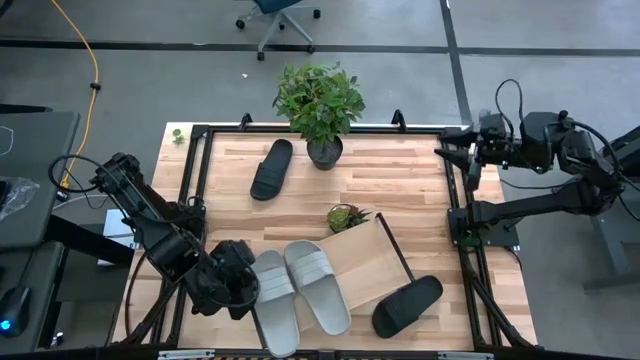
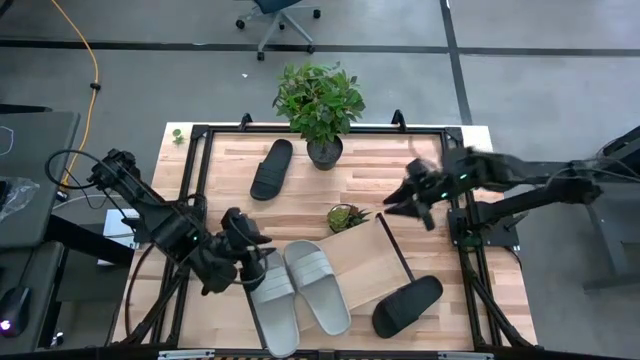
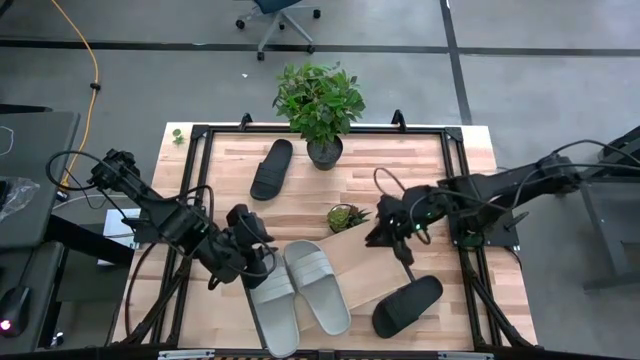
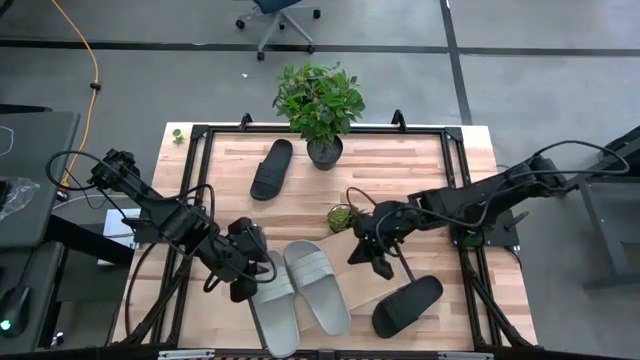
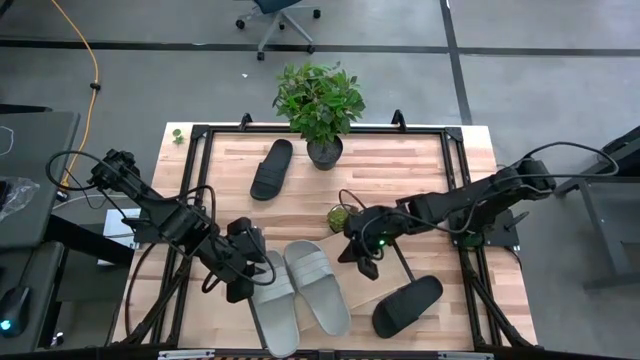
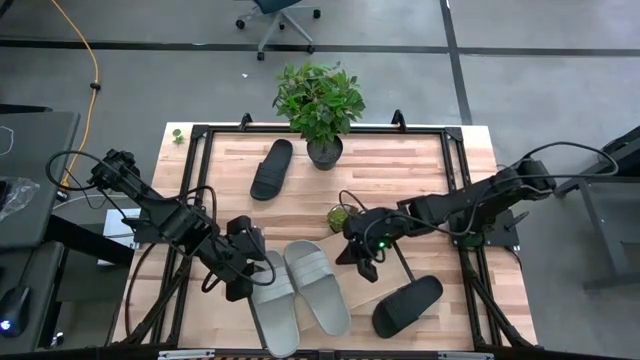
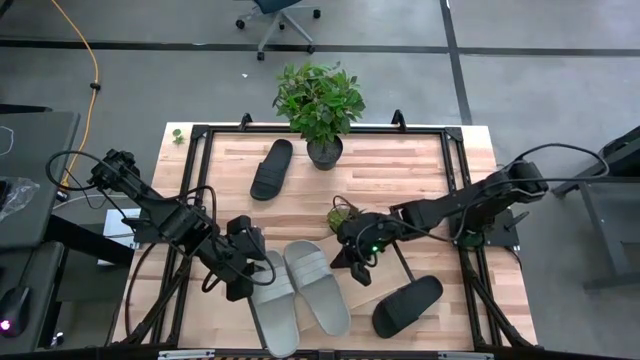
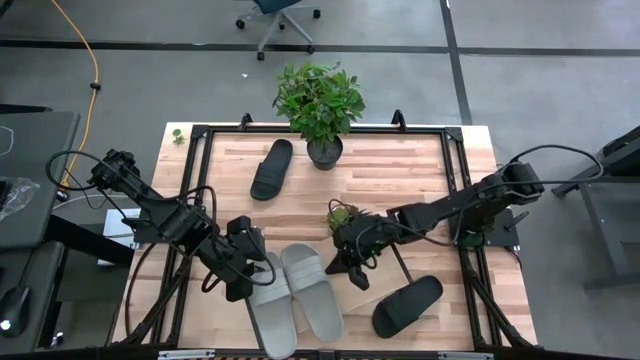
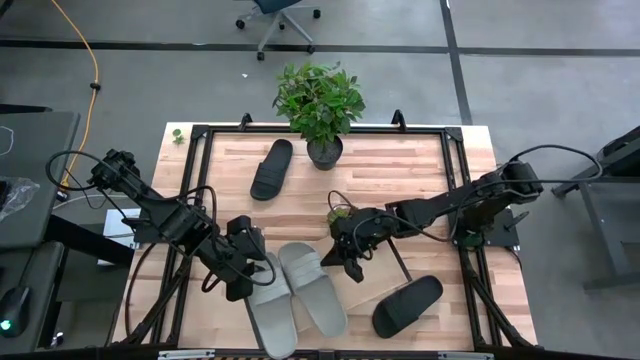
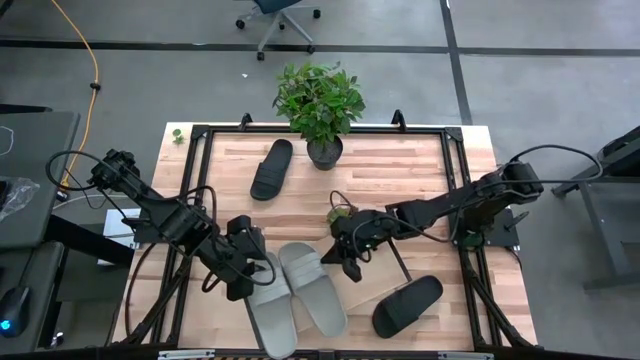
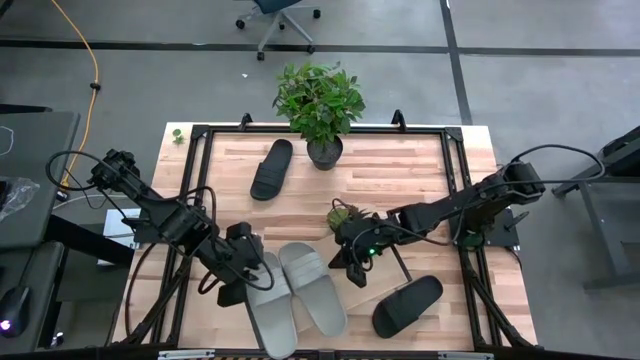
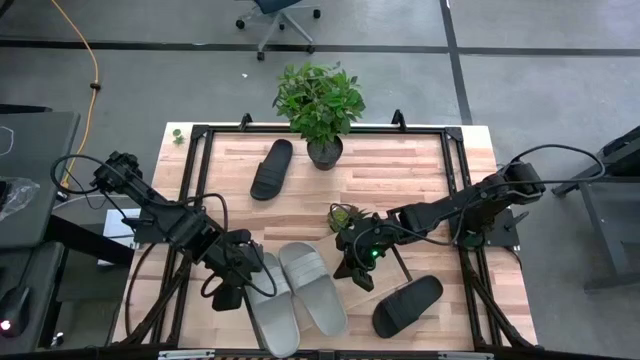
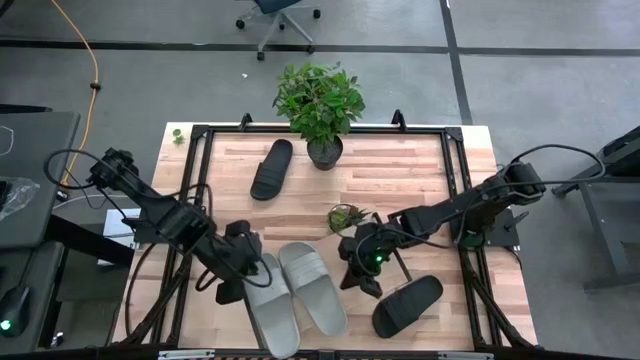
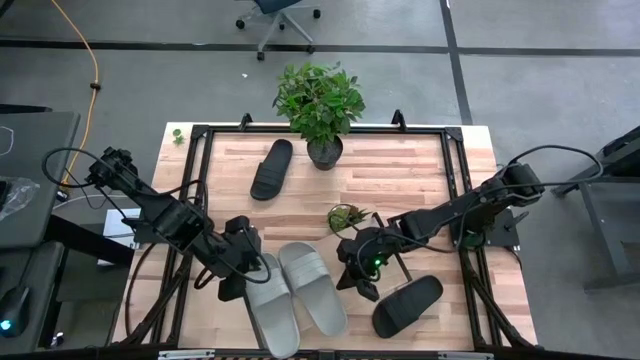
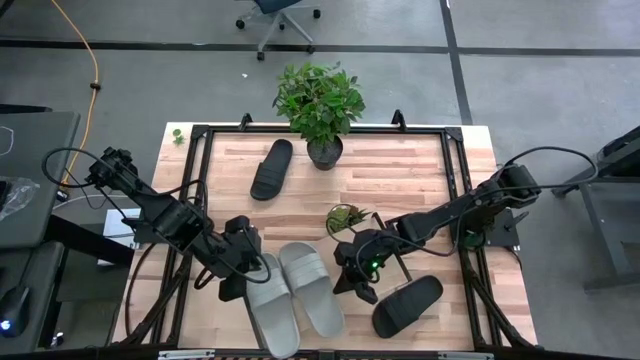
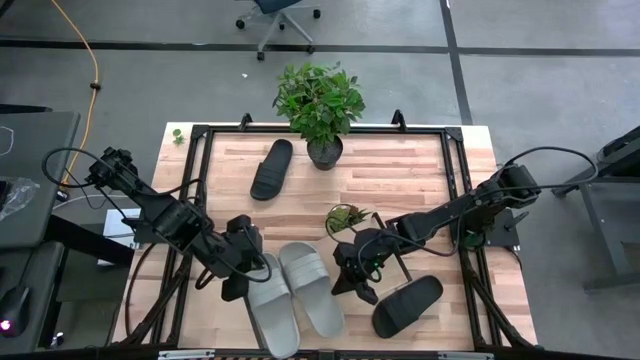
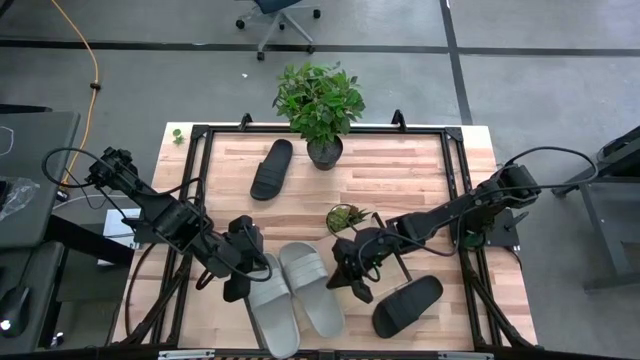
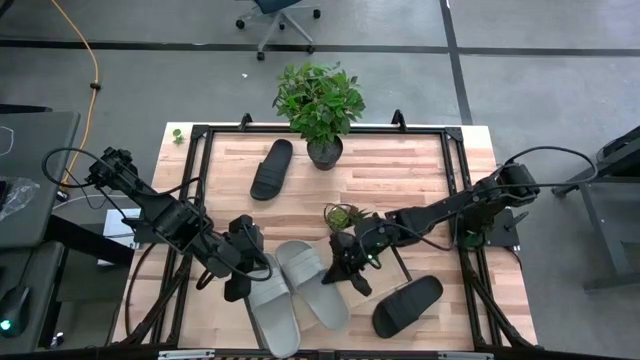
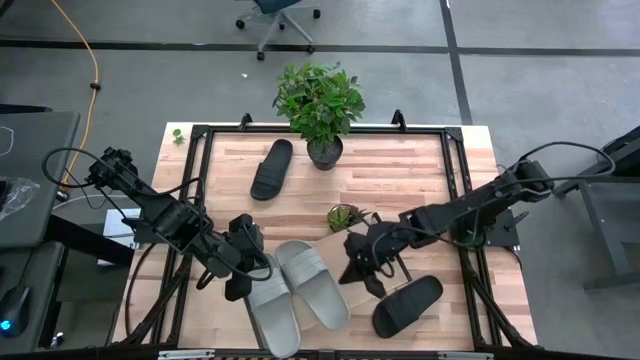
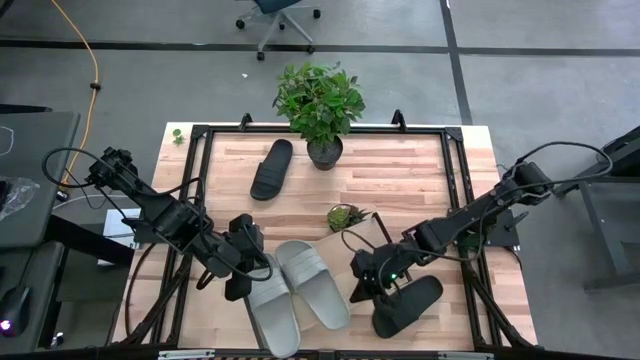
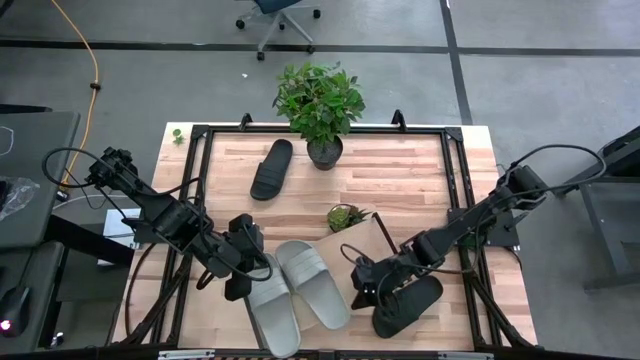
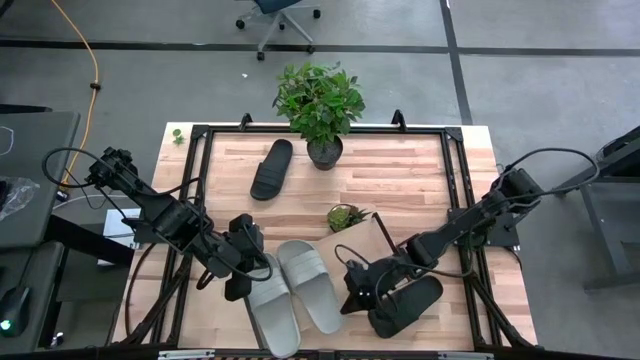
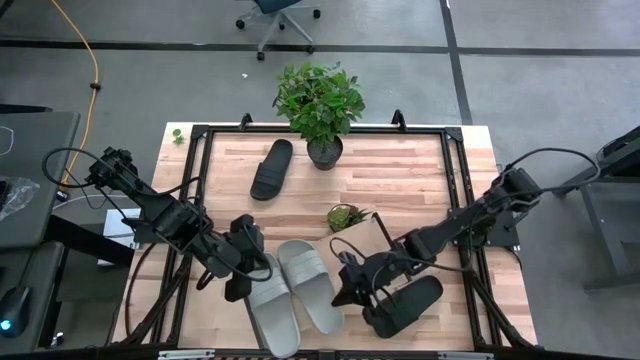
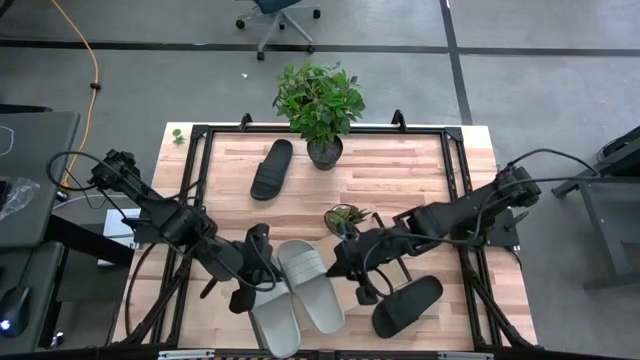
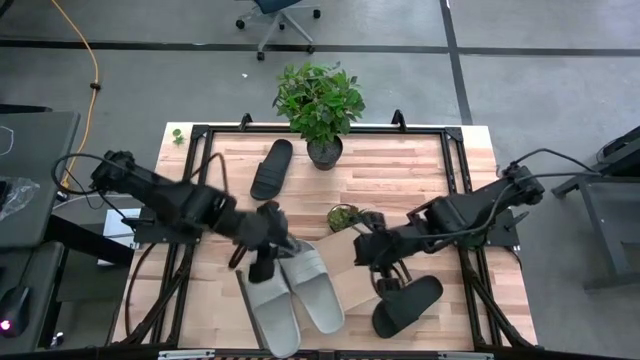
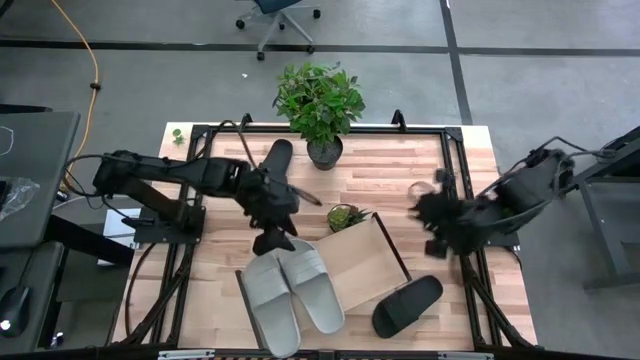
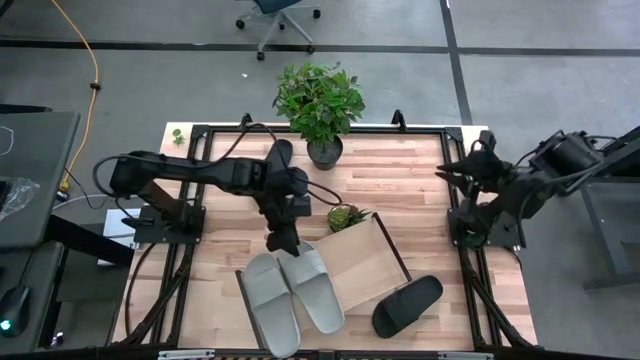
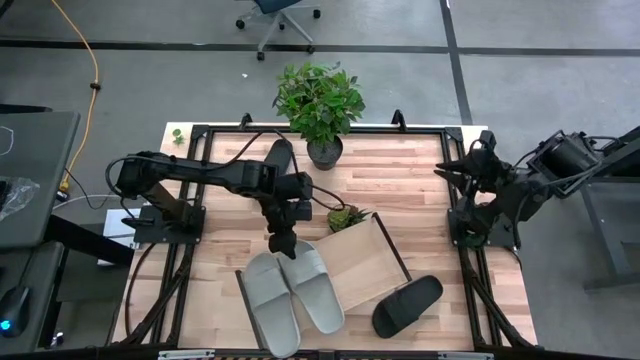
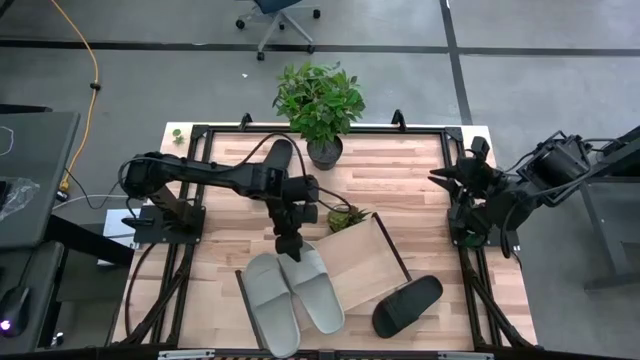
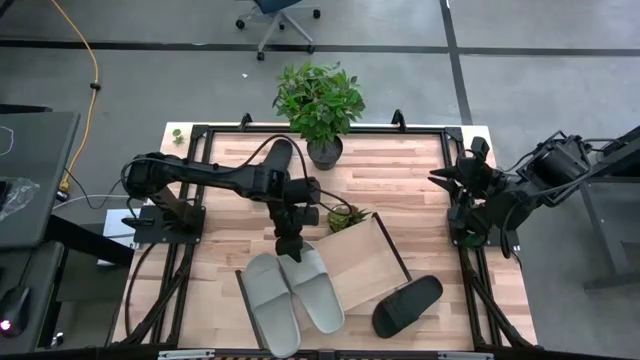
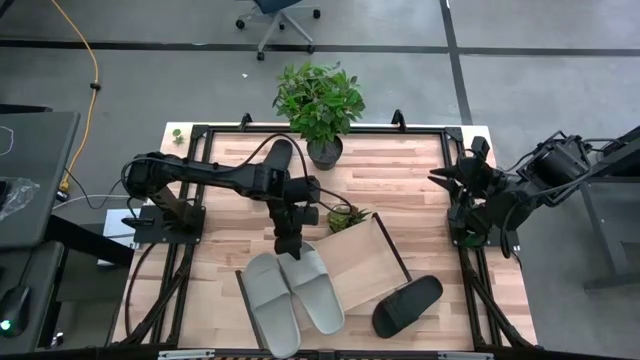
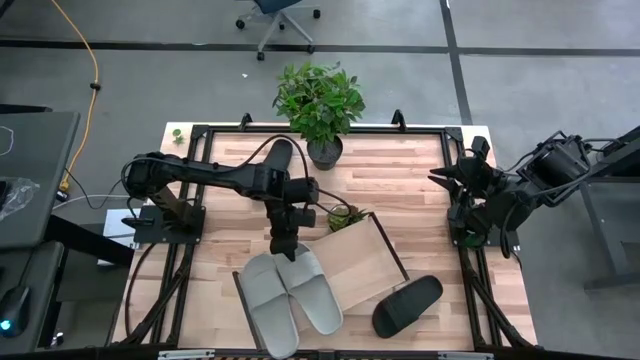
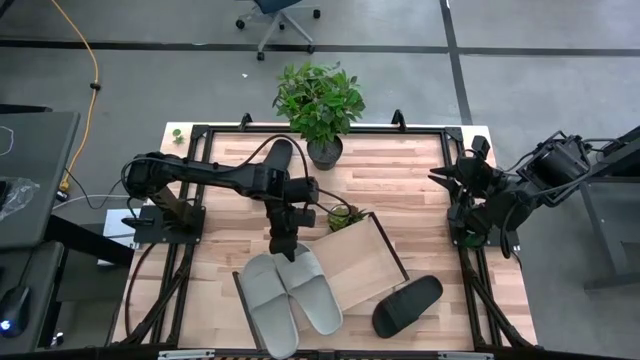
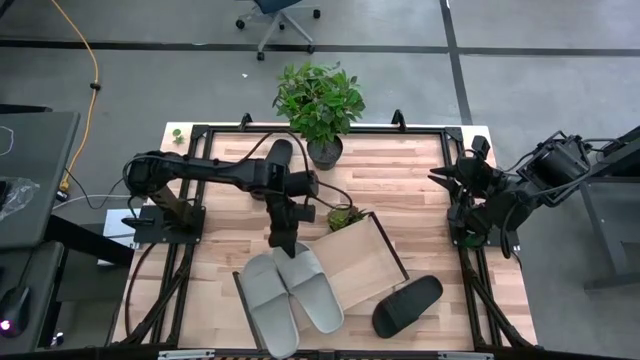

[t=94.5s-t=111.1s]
Task: Pick and place slides into the shelf
Adjust the gray slippers on the shelf

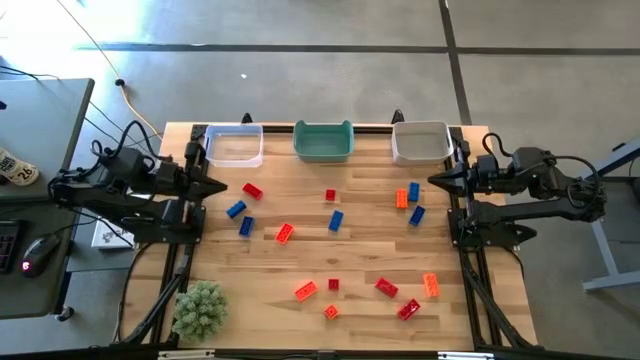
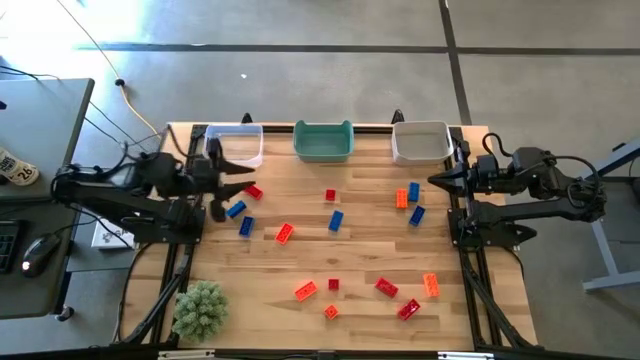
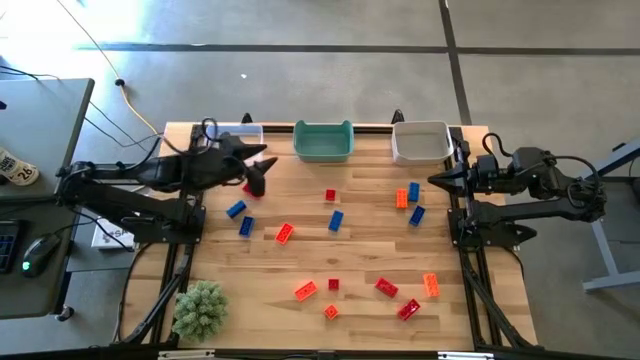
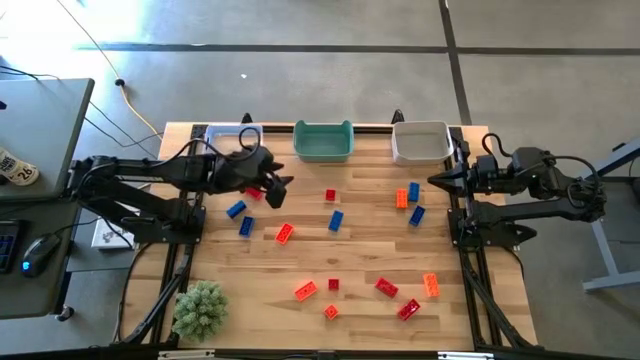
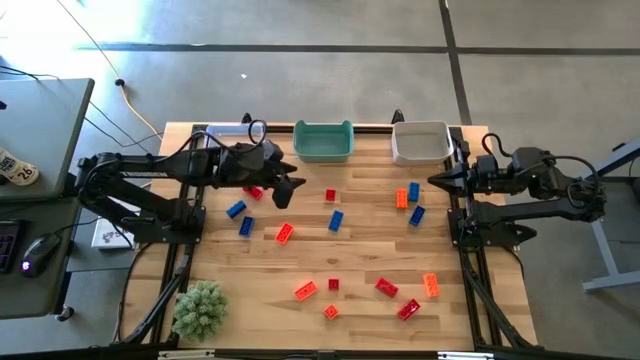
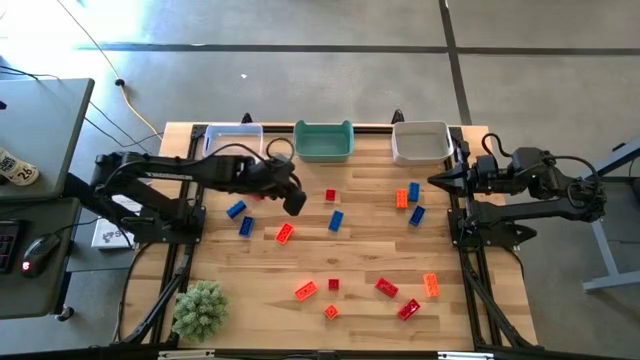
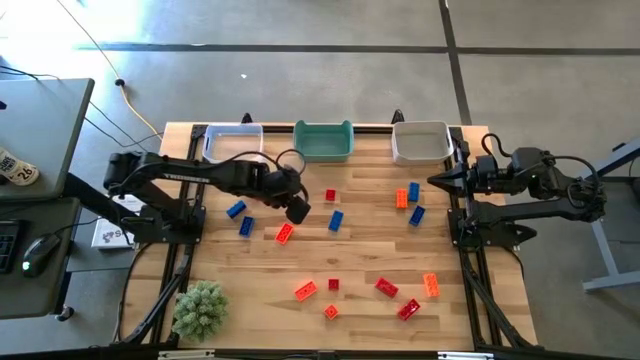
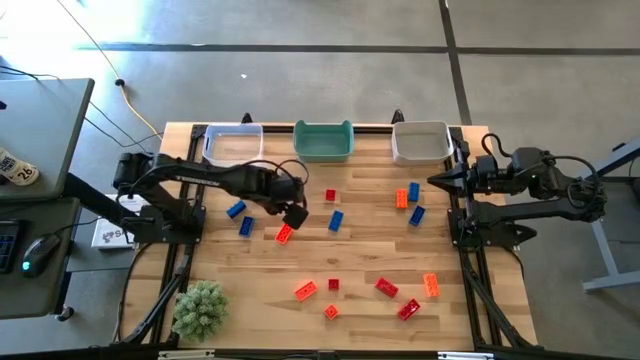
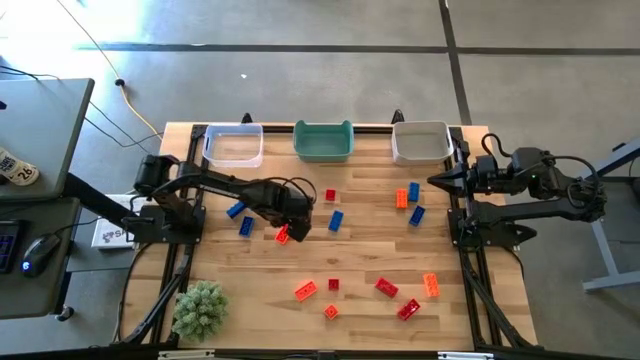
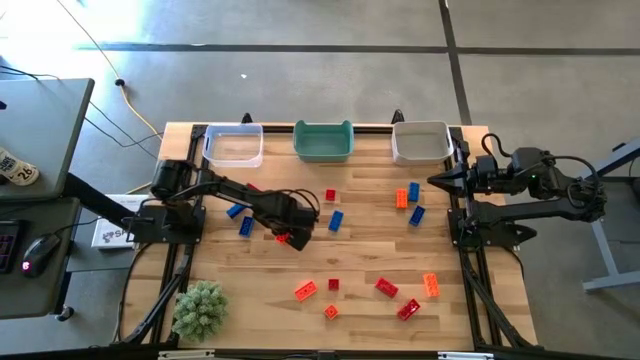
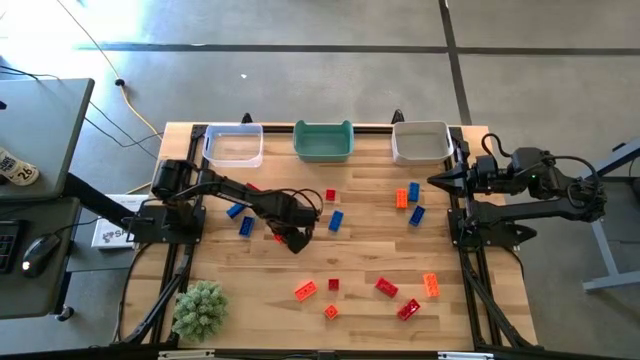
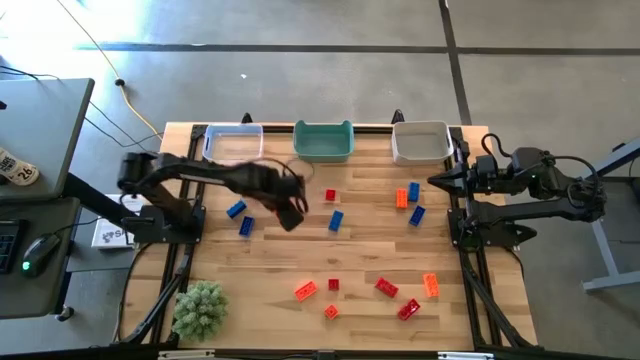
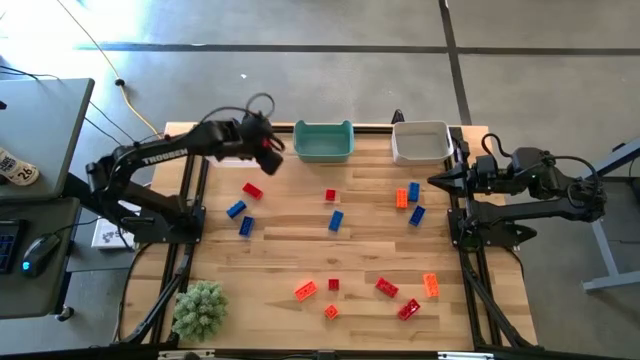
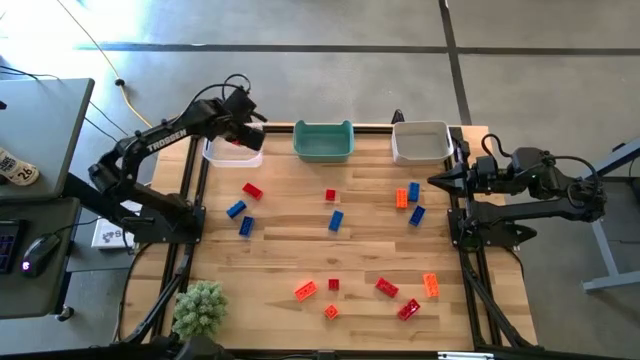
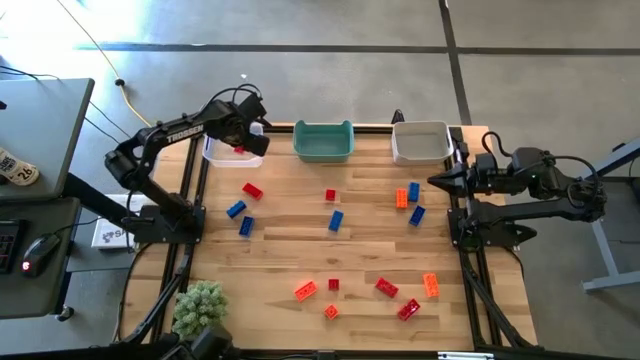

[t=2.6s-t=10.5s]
Task: Sort & place blocks by color
Put the orange game piece into the transparent bin
